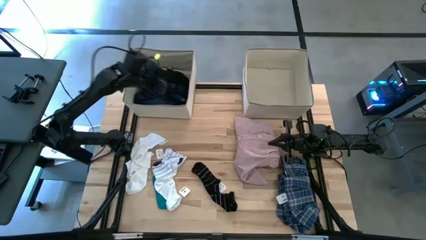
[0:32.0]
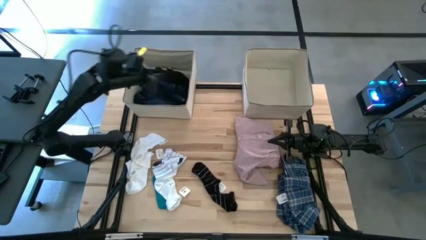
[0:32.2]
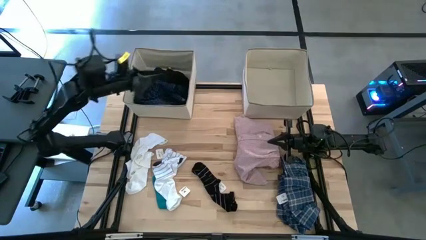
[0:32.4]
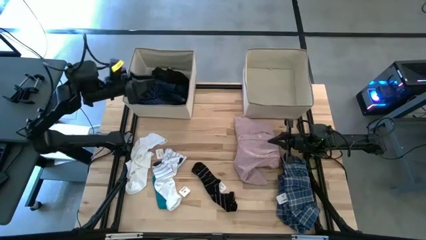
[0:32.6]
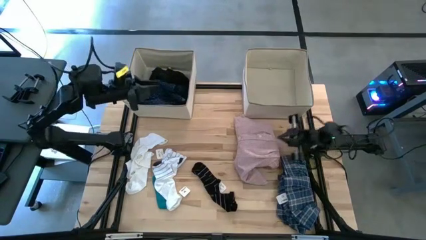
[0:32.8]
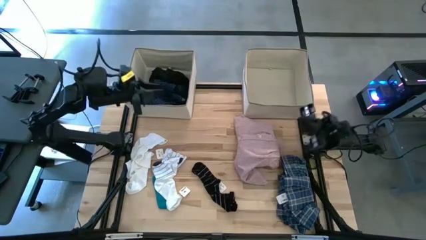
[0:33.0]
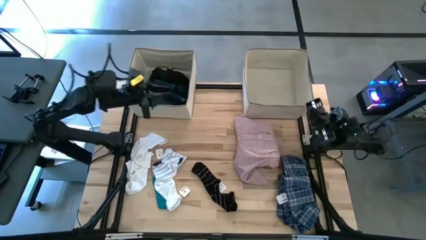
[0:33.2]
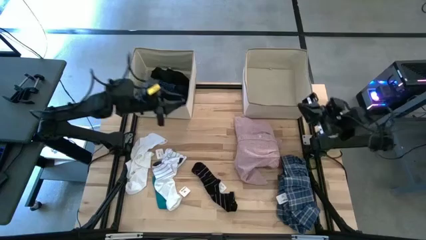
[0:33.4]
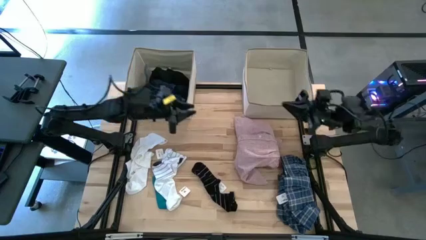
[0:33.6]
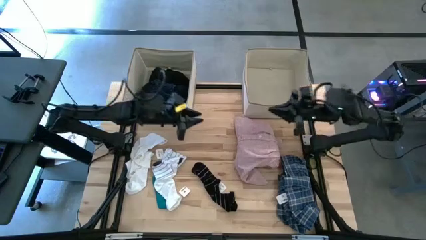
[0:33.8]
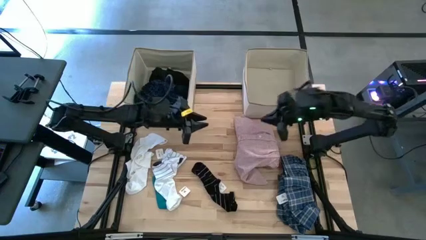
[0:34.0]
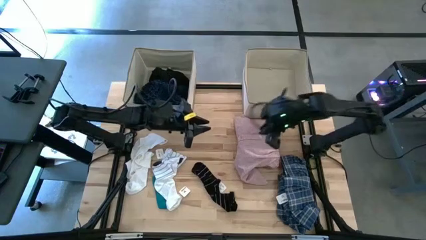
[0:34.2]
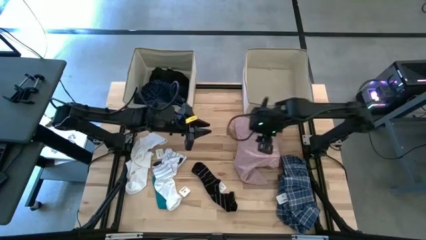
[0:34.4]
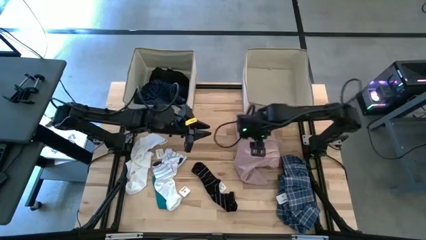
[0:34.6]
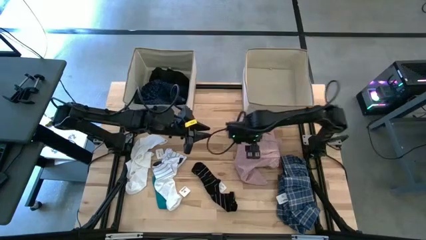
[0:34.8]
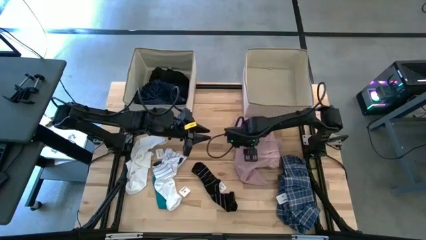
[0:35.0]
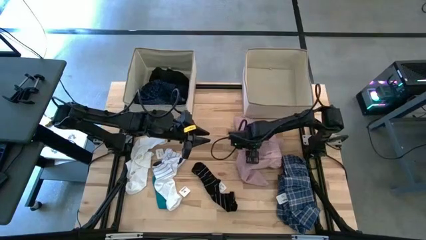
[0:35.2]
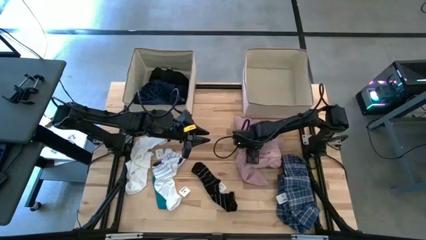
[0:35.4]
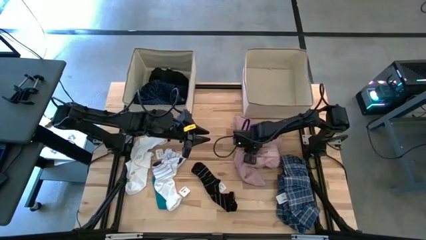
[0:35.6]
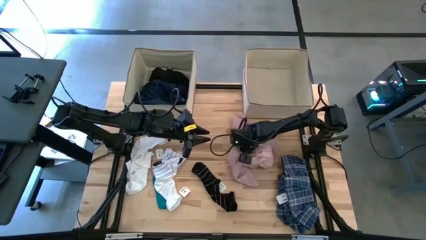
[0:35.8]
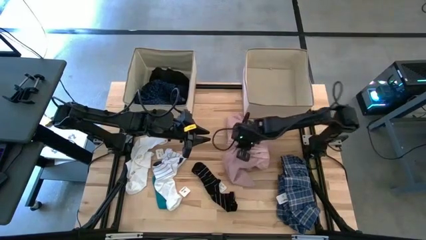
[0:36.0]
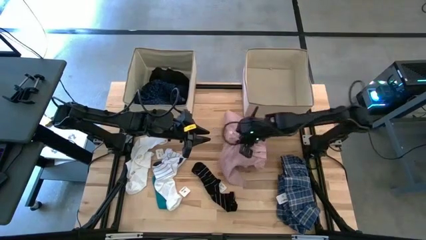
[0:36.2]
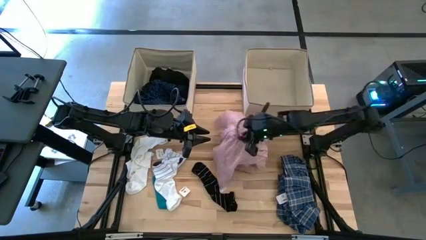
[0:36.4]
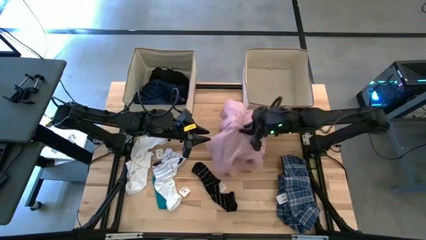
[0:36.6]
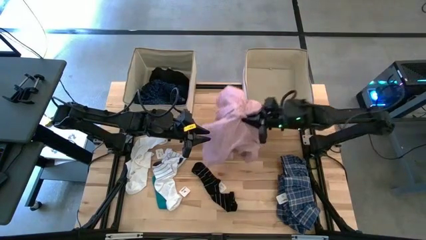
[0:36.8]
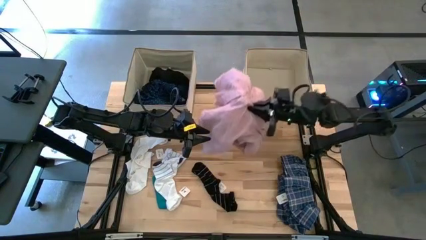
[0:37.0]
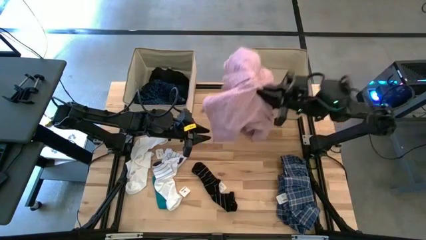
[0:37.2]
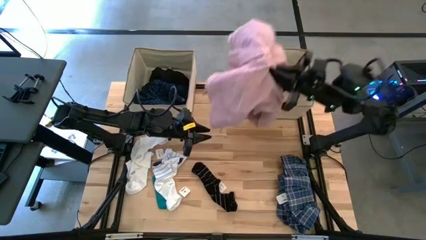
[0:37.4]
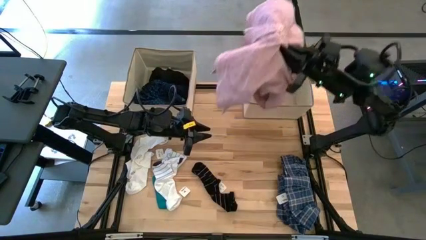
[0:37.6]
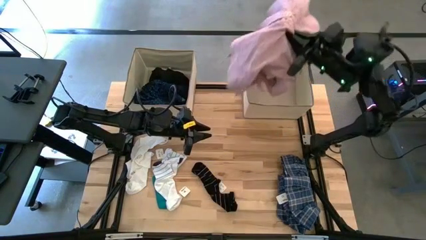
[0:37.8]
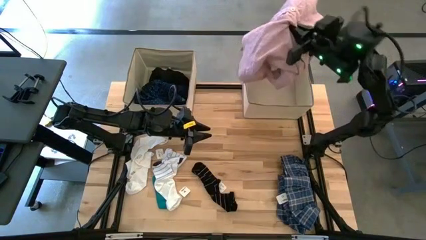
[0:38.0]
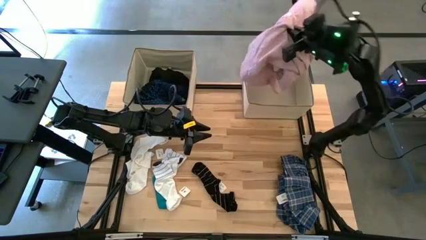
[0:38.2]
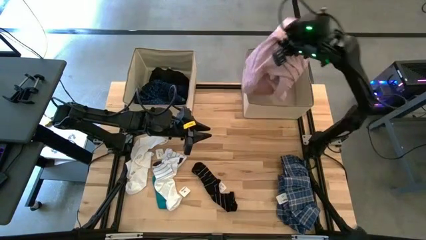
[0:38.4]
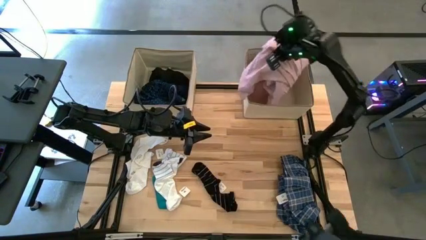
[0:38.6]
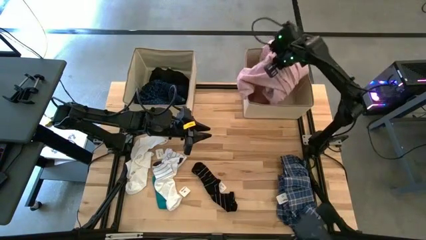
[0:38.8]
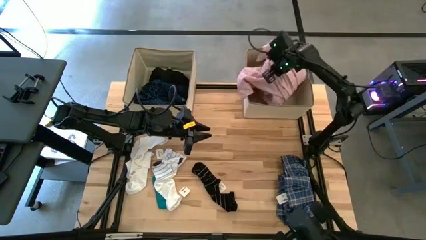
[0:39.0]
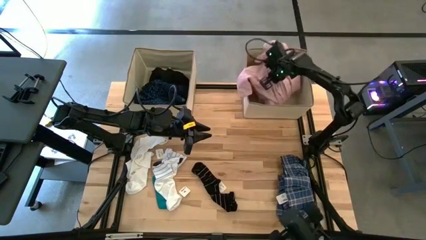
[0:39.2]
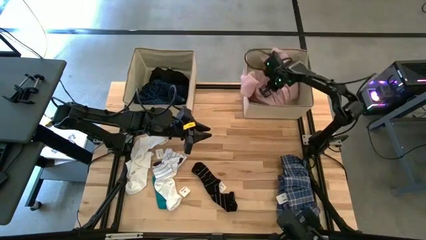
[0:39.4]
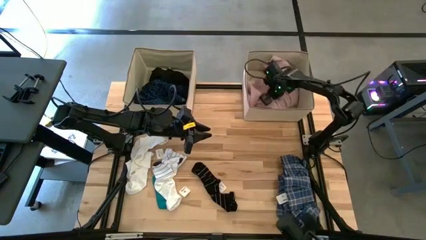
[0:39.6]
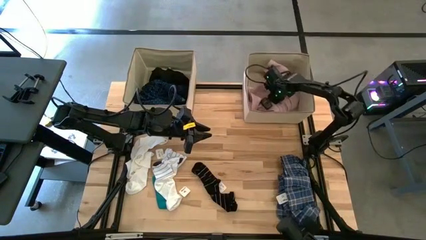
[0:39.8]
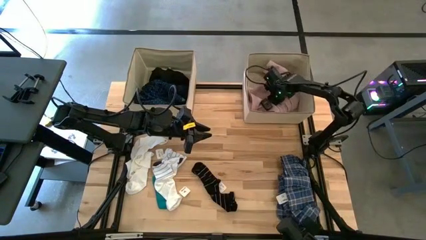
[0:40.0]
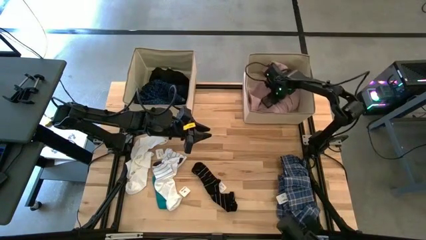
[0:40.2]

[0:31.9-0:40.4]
Task: Sort clothes
Put the pink polo shirt into the right laundry organizer

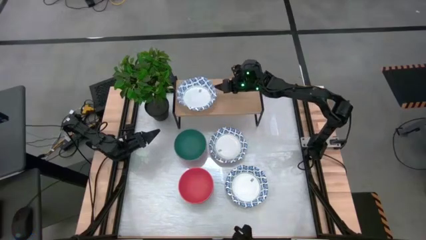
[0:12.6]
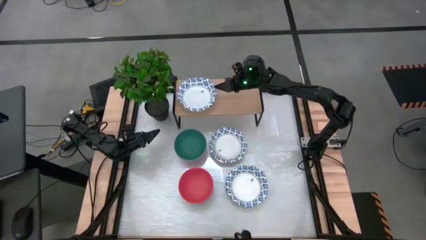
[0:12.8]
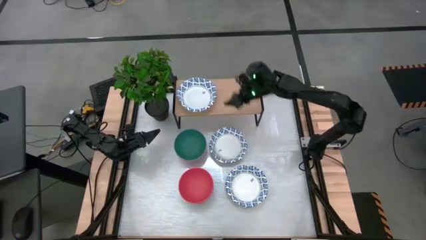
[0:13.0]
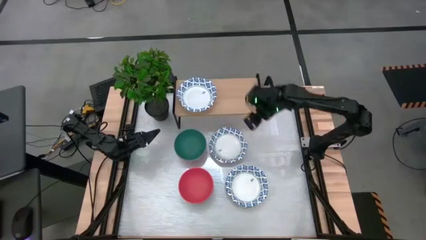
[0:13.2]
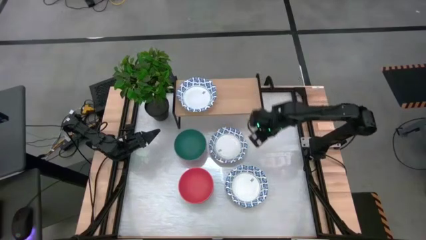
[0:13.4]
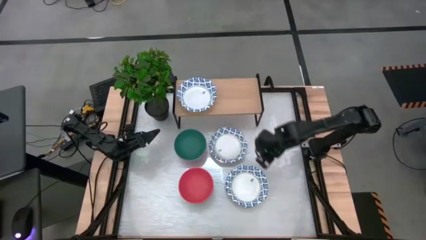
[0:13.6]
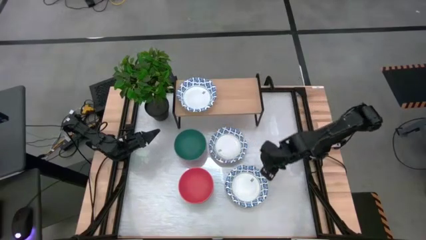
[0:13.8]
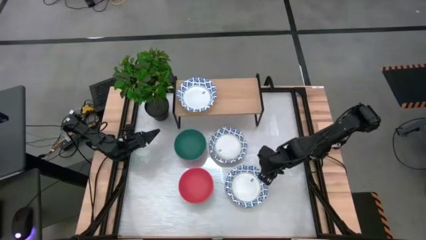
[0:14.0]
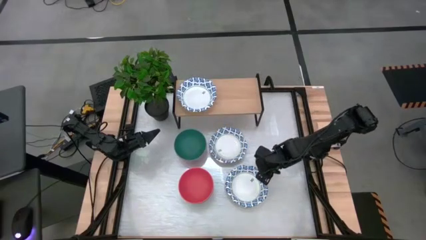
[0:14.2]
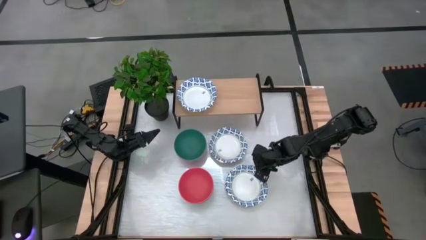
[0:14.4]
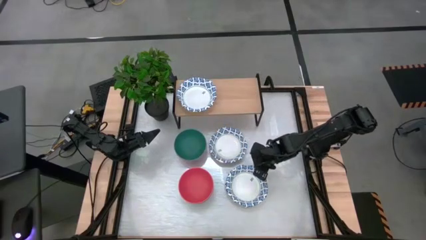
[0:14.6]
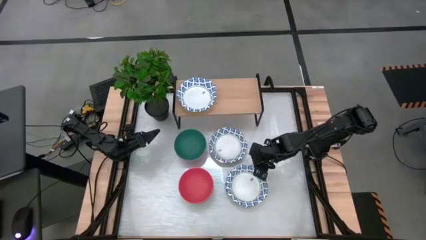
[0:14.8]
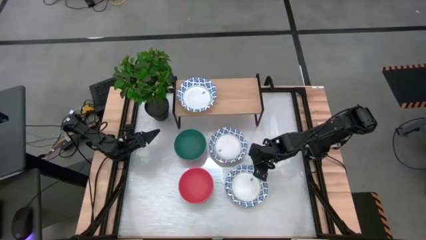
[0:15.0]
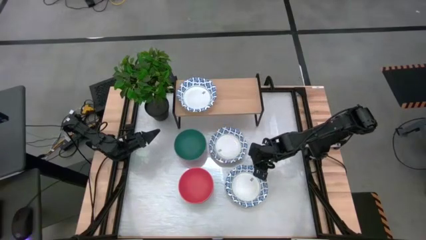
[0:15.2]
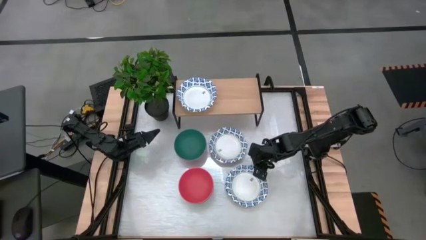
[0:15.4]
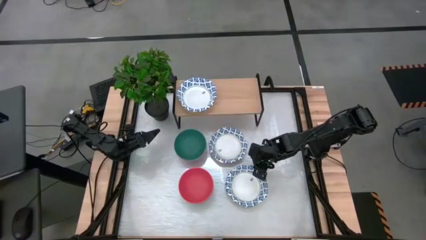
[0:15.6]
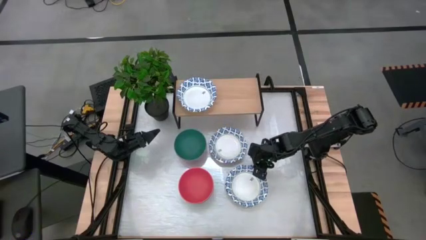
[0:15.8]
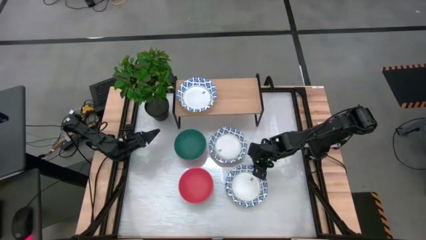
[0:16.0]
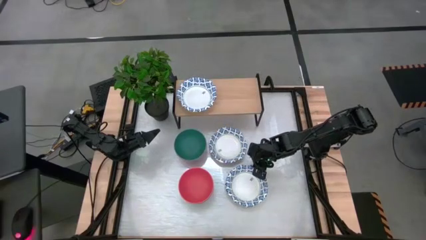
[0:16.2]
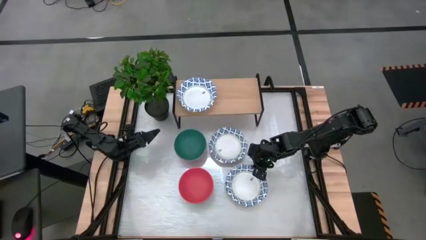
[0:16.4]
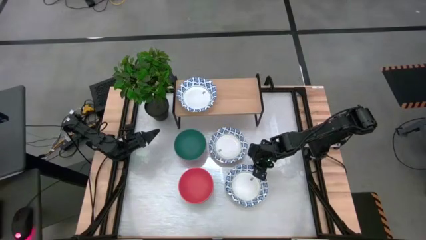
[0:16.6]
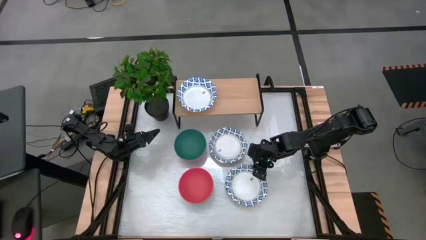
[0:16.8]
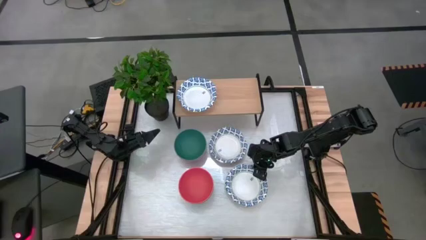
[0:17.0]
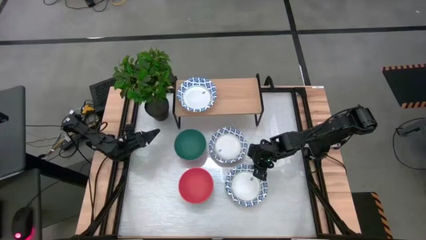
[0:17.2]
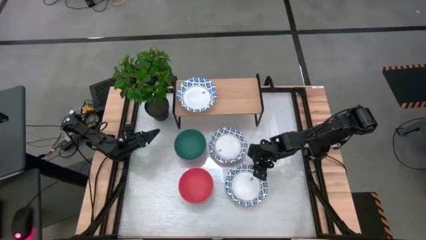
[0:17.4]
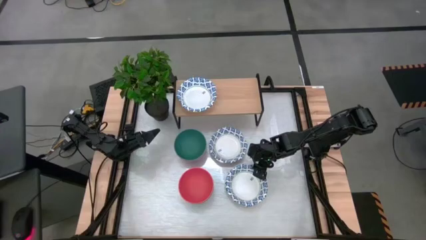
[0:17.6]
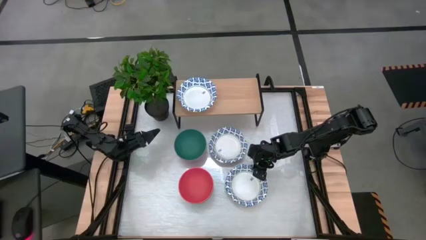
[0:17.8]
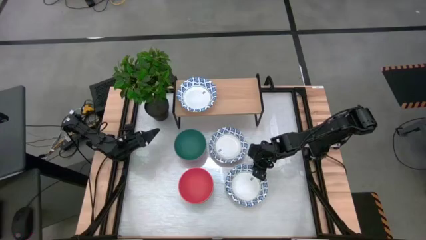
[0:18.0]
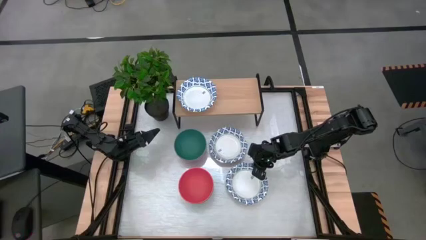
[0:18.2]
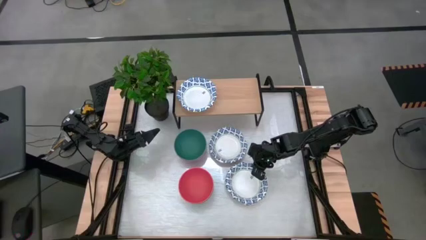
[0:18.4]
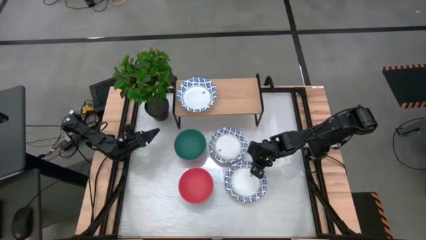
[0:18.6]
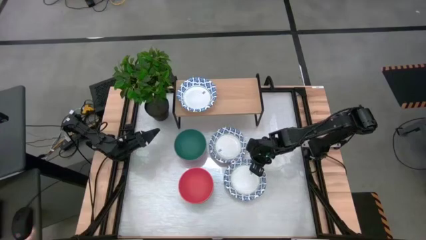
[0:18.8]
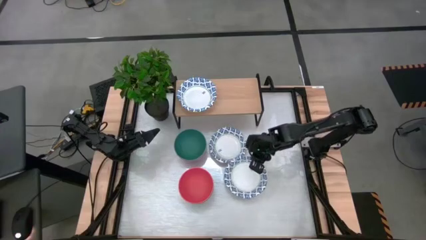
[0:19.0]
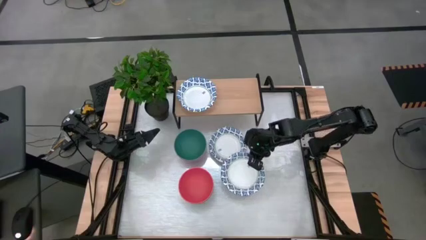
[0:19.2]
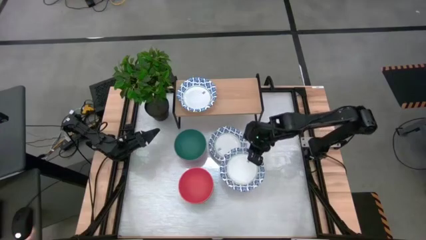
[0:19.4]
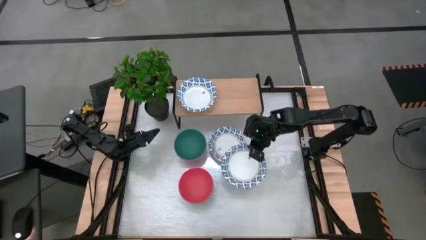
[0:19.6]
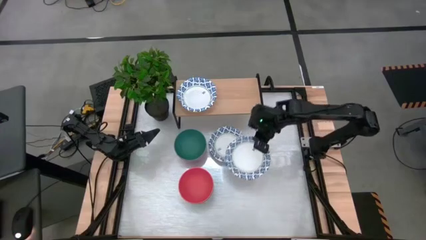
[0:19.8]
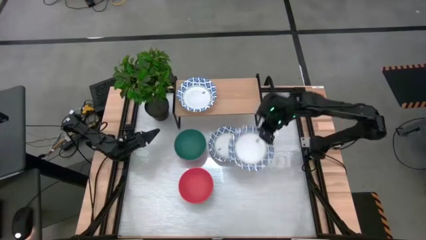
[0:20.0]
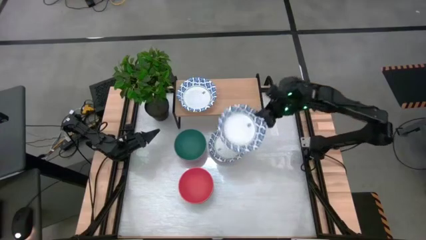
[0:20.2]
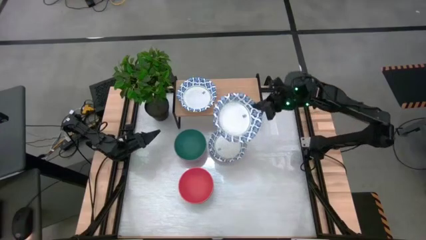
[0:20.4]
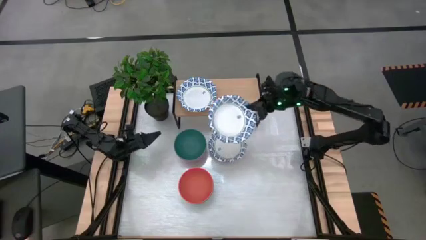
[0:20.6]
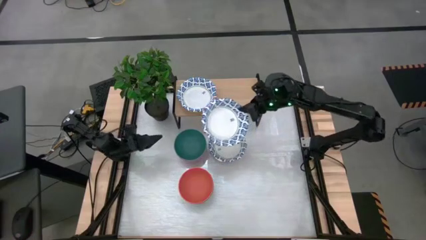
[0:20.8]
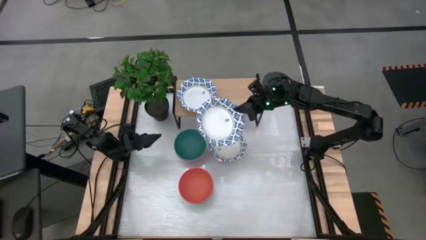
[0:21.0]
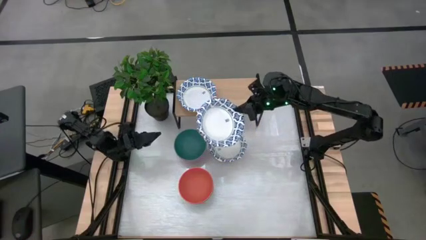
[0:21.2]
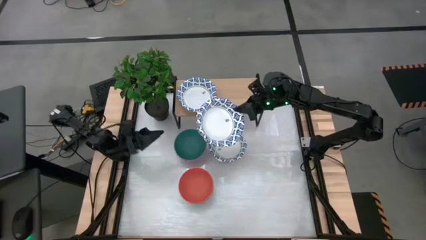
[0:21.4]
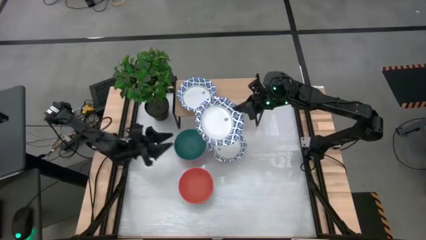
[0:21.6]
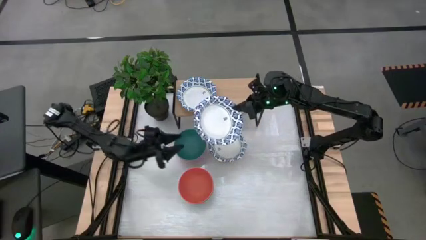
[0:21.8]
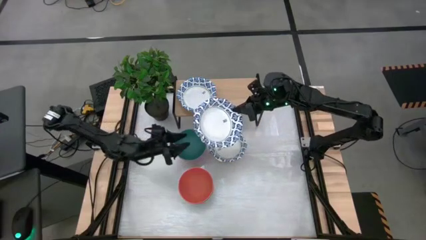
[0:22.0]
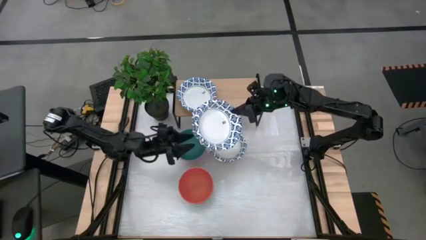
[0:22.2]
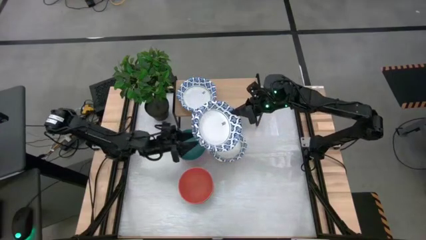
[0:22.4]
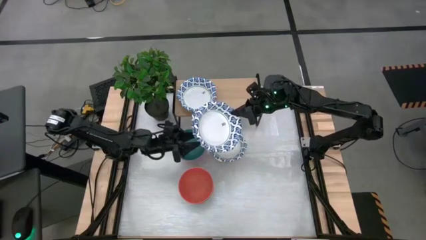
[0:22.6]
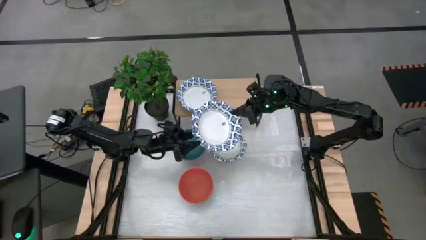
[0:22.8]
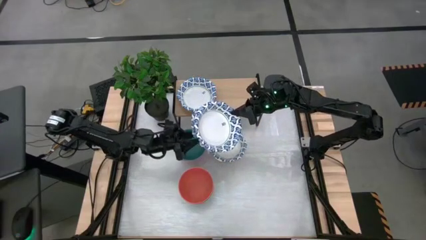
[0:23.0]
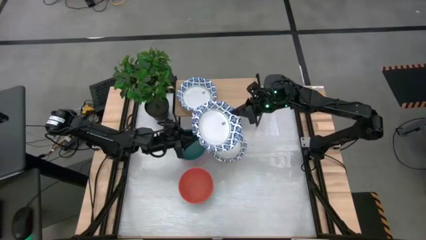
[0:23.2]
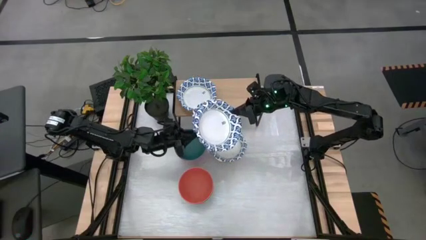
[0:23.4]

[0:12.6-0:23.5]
Task: Place and stack bowls onto a shelf
Stack the white bowl on top of the white bowl on the shelf
